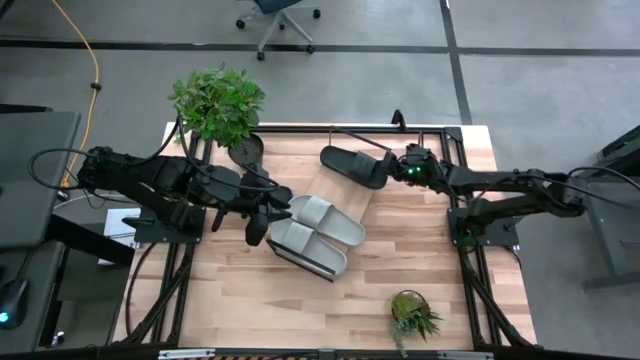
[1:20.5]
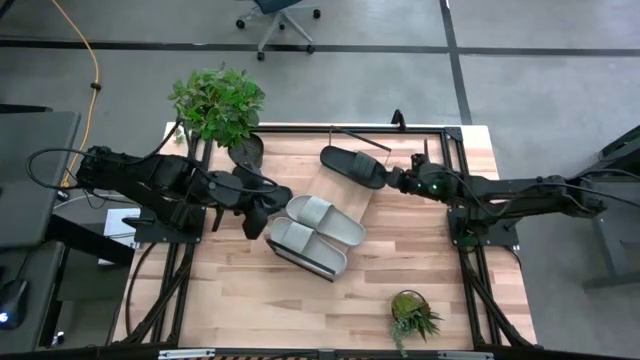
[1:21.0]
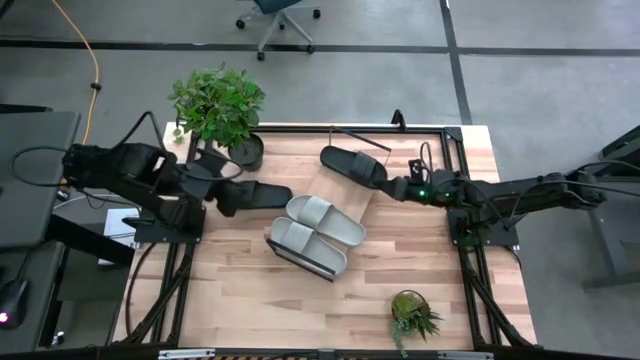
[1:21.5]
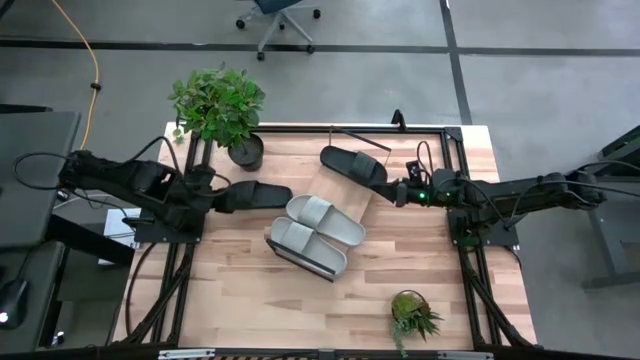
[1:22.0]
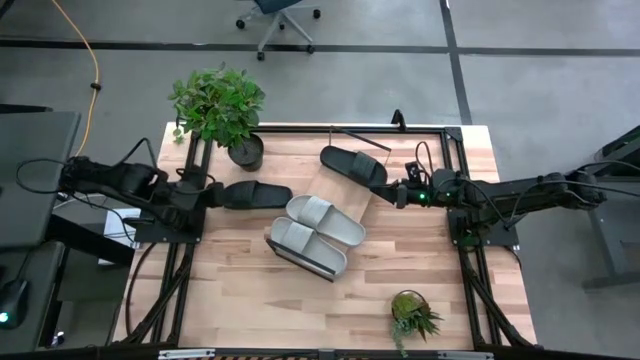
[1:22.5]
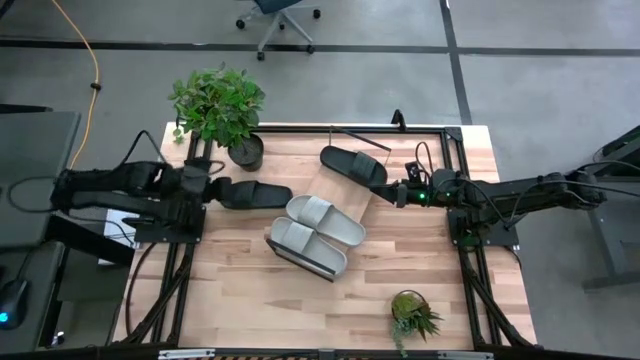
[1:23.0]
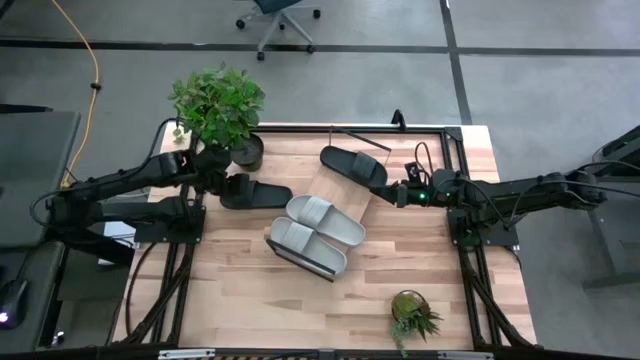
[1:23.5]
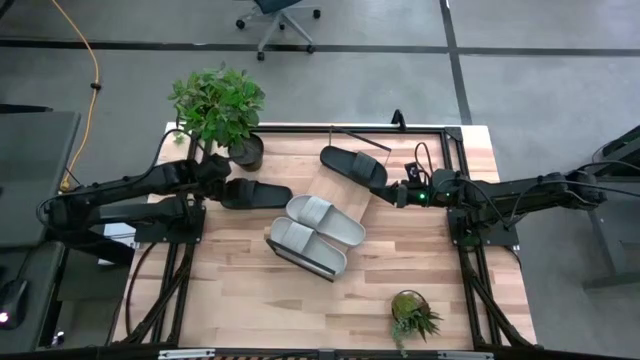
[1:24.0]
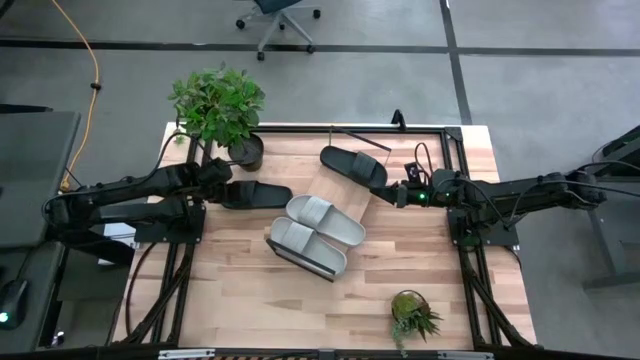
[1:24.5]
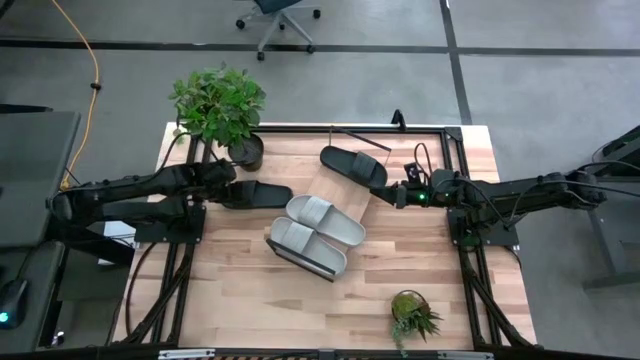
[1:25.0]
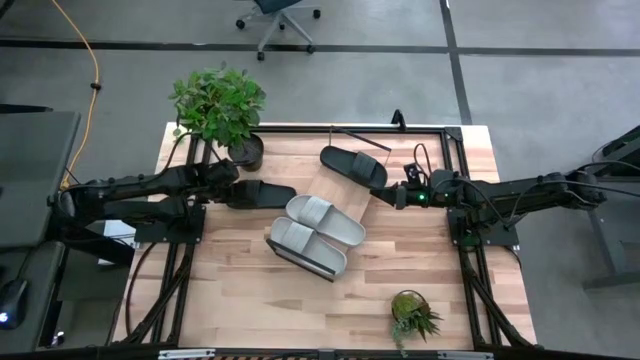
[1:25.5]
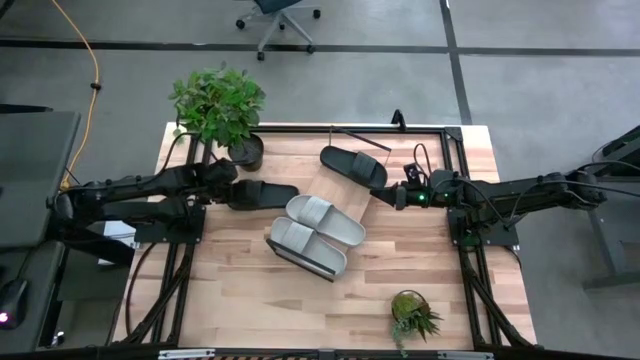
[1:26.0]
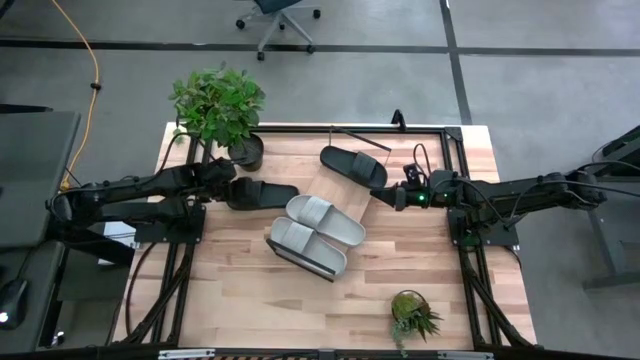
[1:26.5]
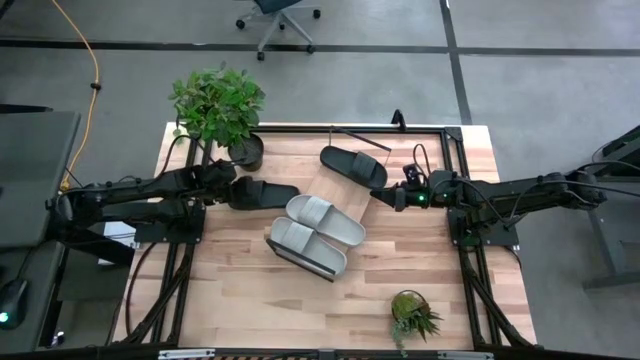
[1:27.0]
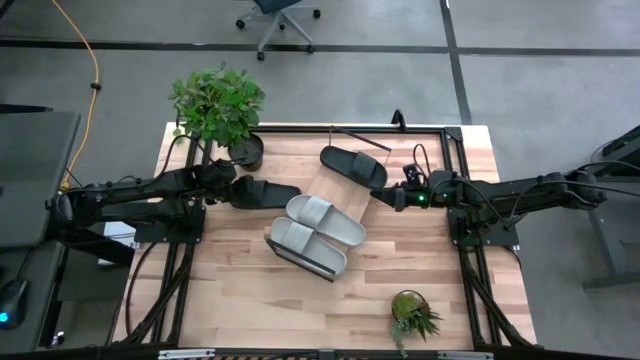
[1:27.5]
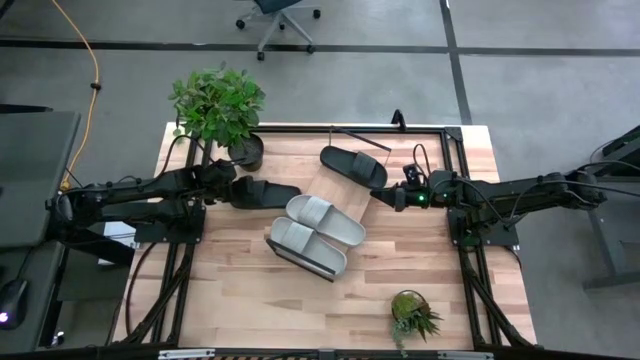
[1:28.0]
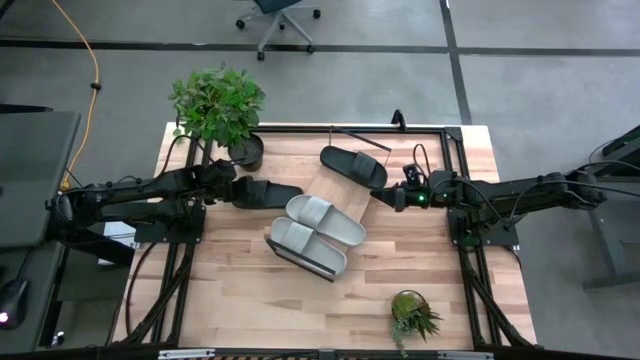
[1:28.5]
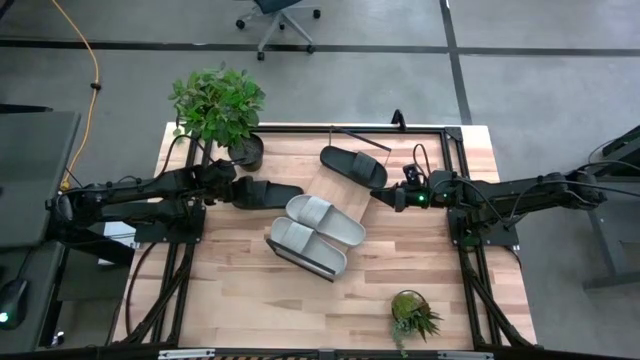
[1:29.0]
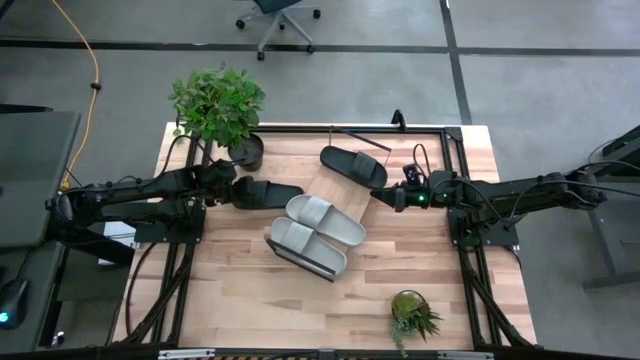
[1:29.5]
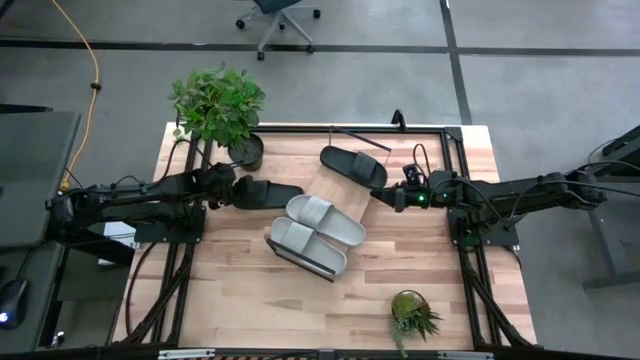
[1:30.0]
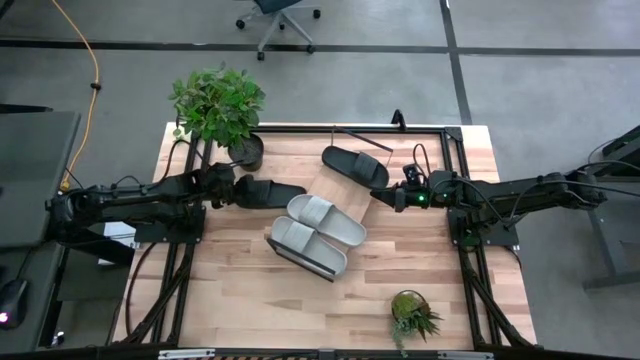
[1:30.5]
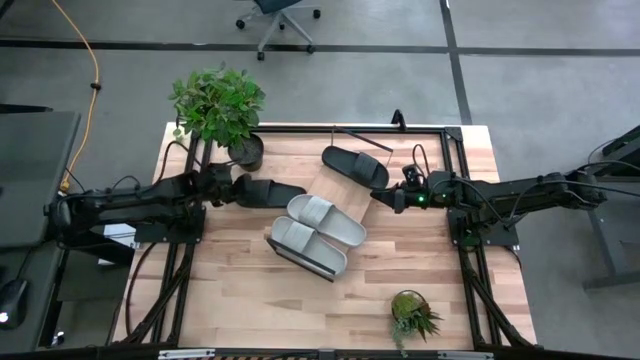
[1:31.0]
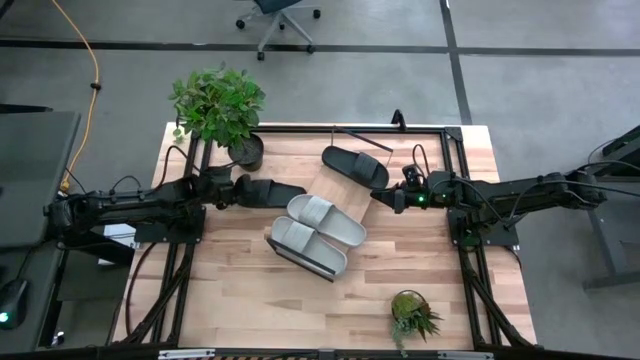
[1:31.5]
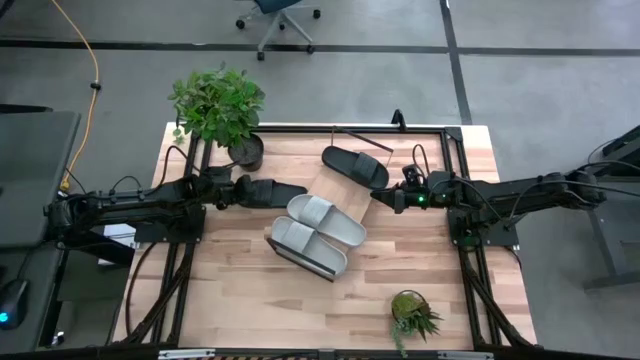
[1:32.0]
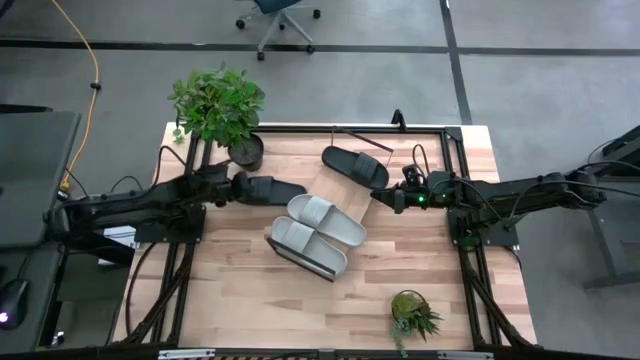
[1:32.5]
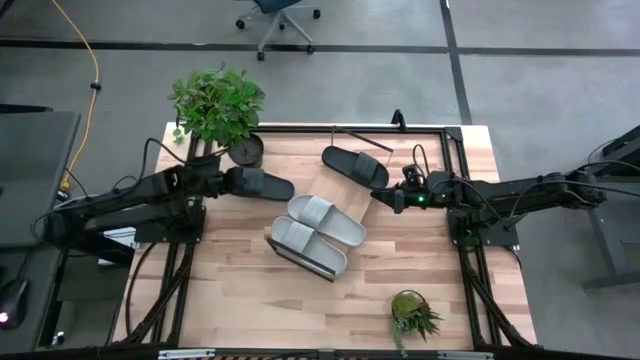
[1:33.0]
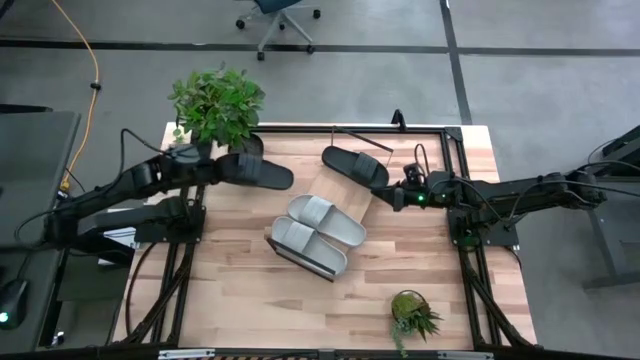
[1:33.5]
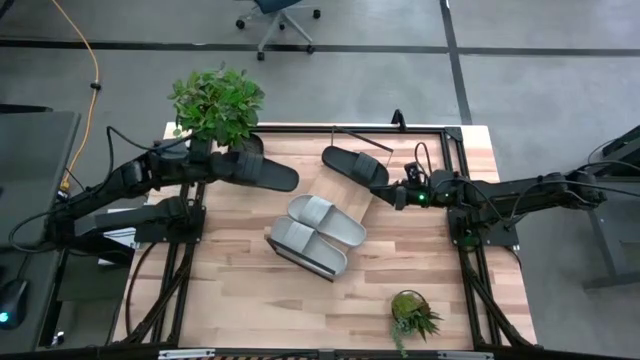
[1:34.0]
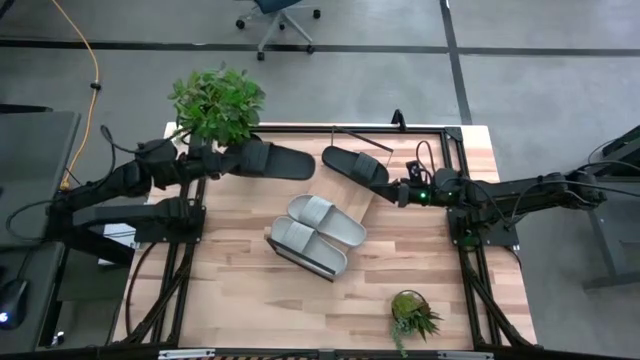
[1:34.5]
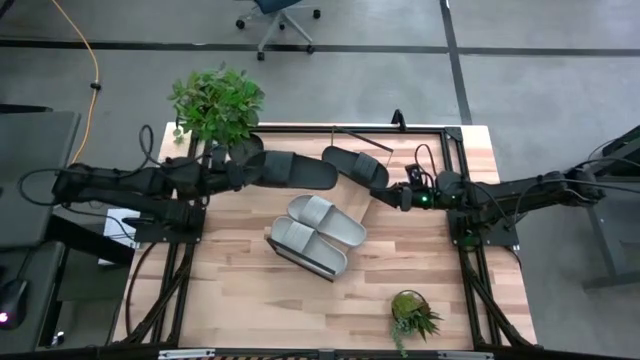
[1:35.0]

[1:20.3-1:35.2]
Task: Pick and place slides into the shelf
Put the black slide on the shelf

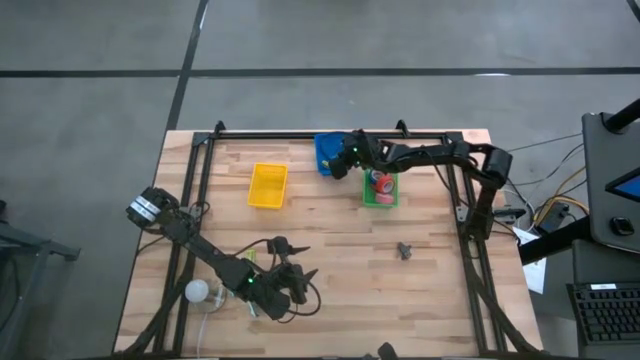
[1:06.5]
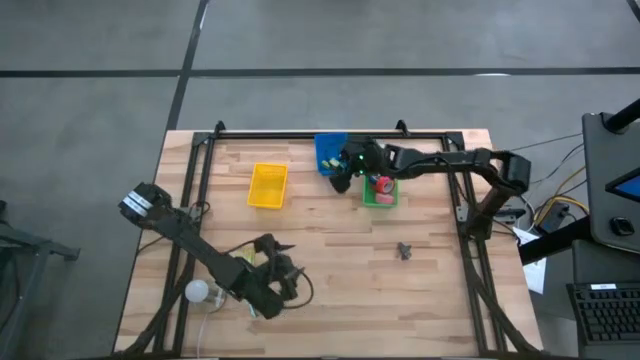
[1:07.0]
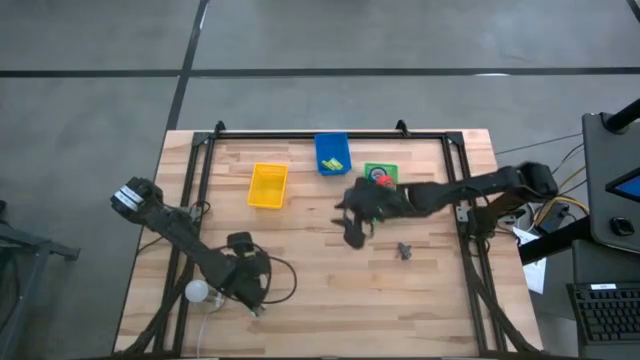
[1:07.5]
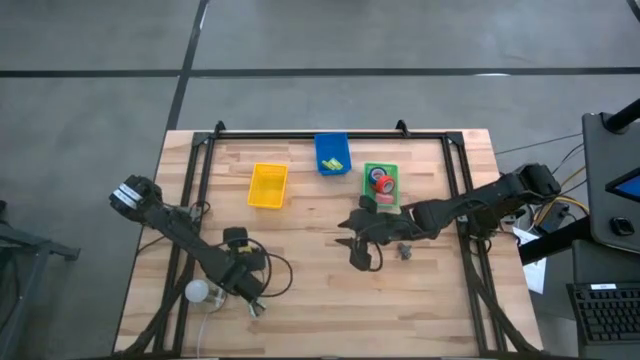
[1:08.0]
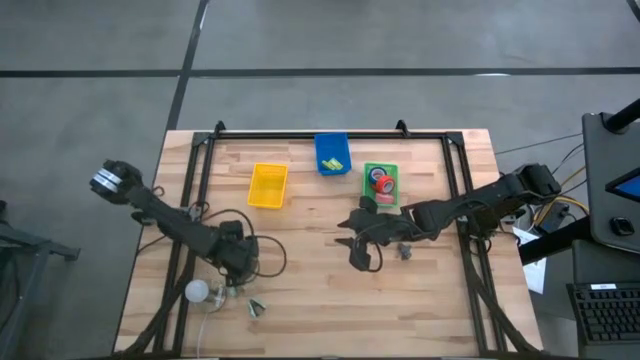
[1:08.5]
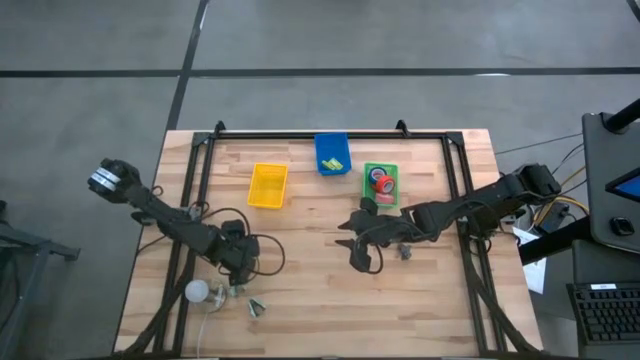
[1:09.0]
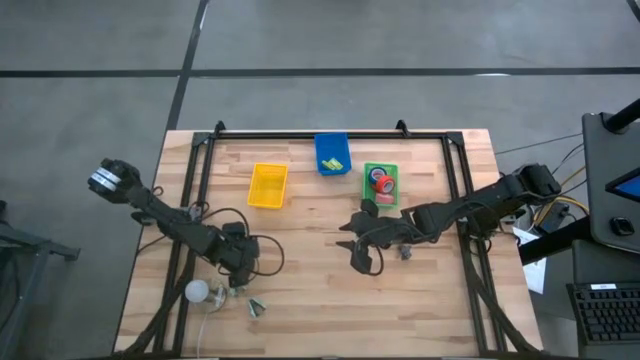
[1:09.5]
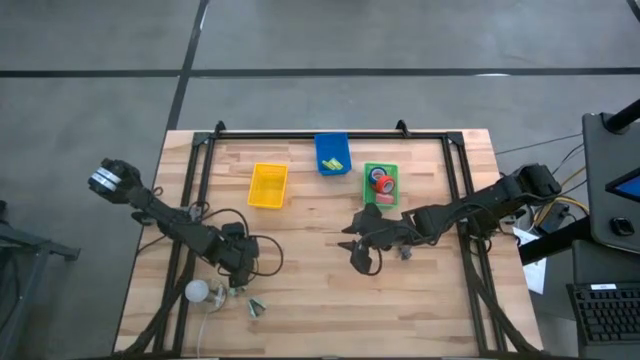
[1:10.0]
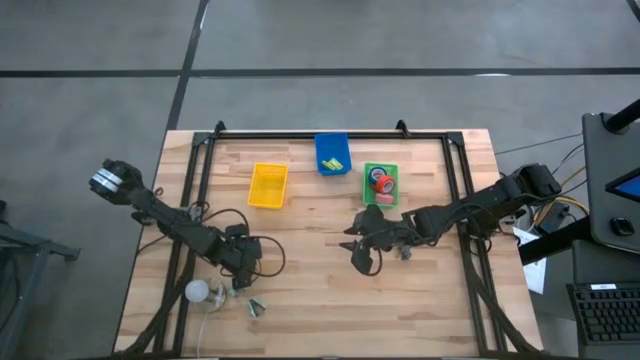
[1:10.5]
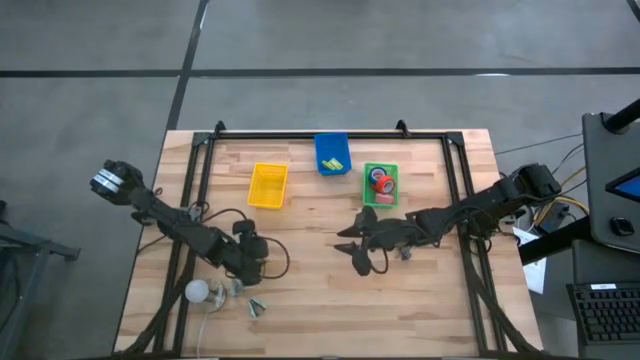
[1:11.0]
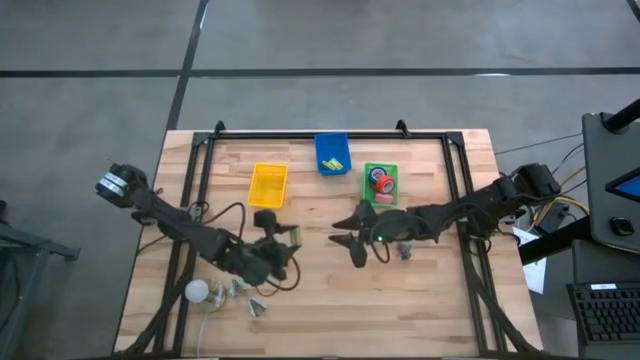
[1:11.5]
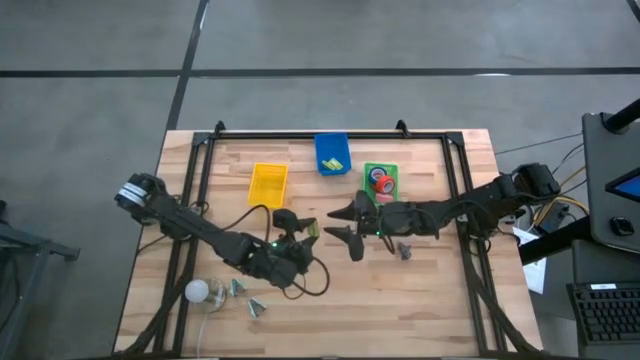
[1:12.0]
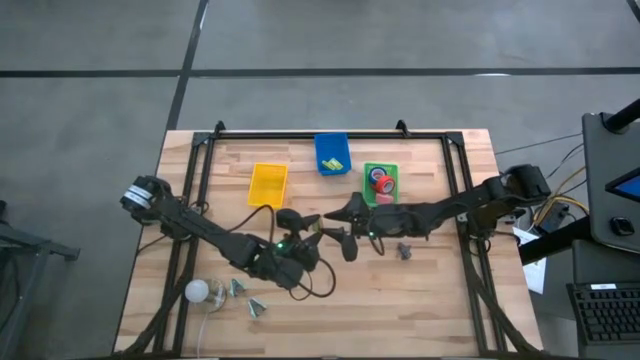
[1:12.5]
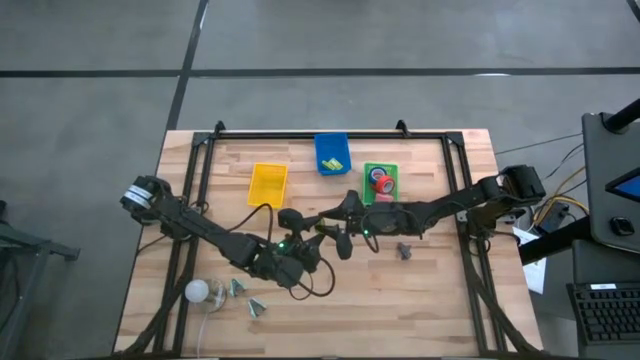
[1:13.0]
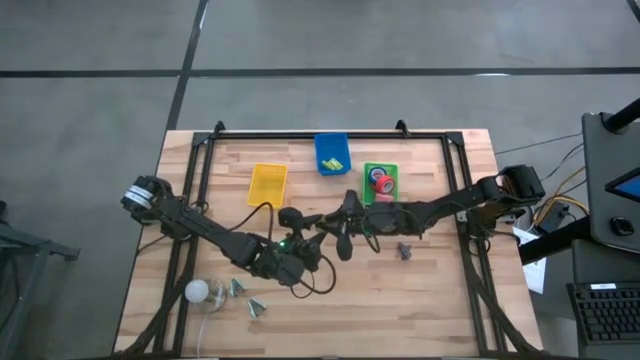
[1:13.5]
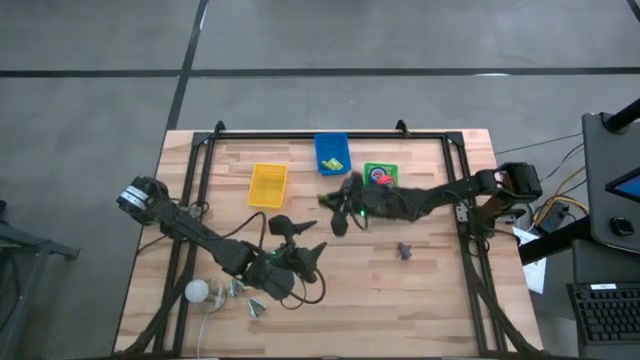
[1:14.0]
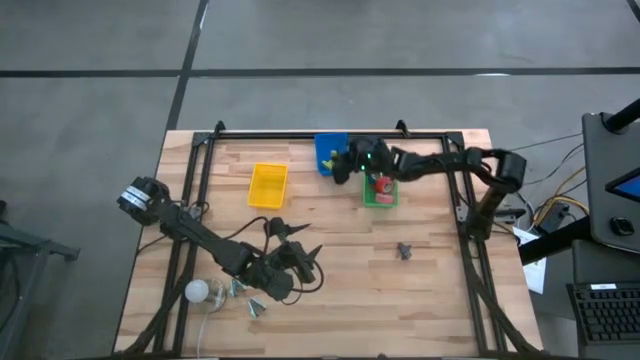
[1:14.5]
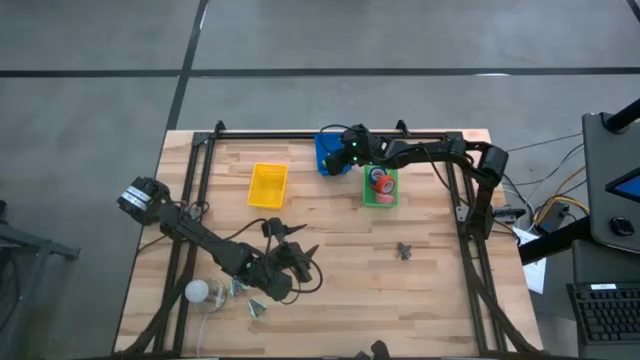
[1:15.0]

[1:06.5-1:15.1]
Task: Pick and place Stapler, Stapler remover, tape
Put the green staple box into the blue basket
